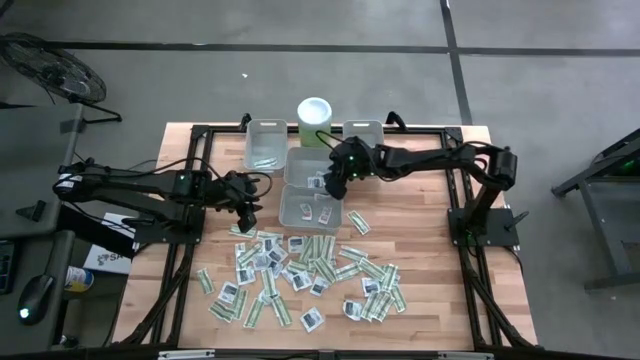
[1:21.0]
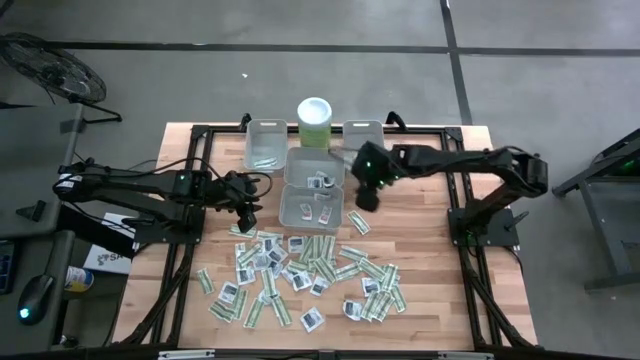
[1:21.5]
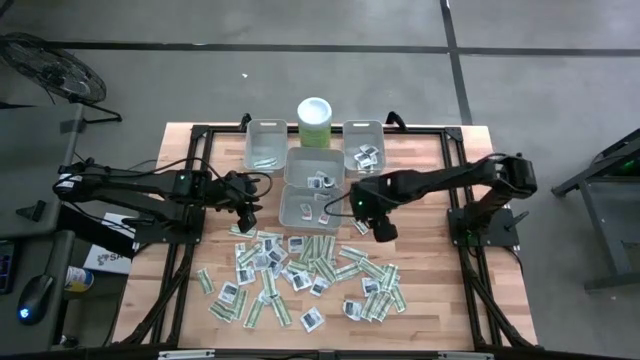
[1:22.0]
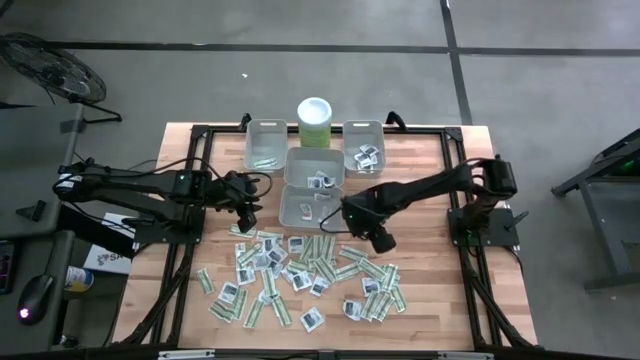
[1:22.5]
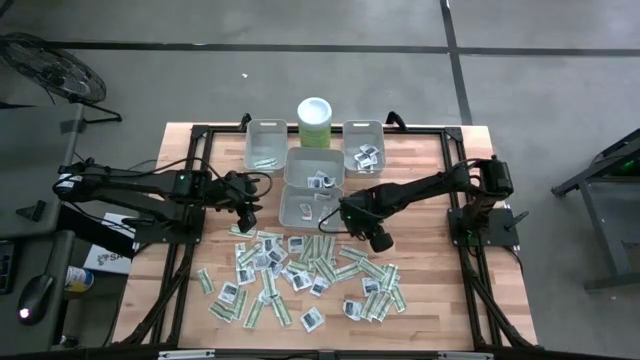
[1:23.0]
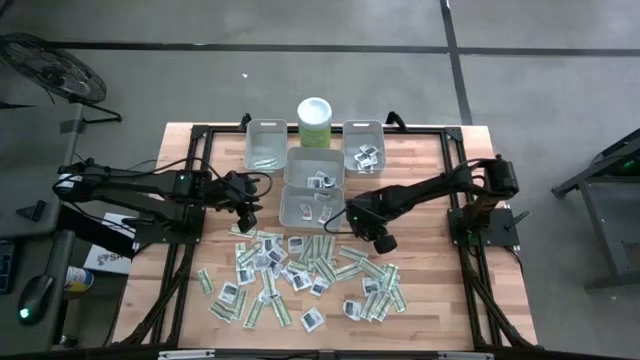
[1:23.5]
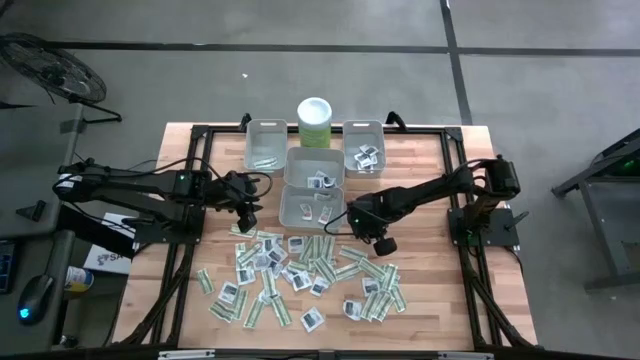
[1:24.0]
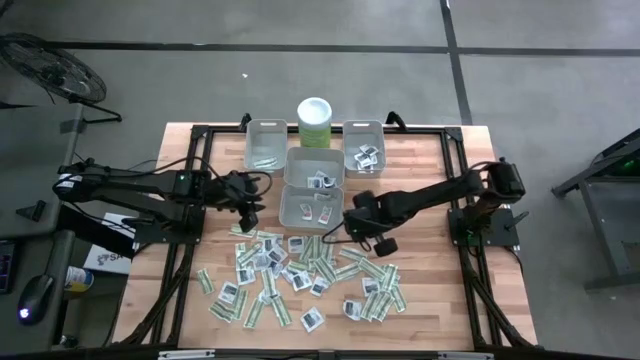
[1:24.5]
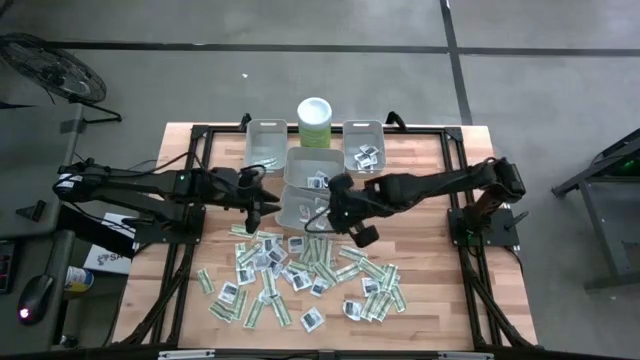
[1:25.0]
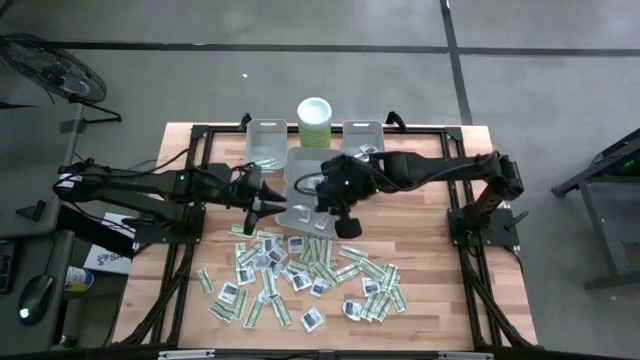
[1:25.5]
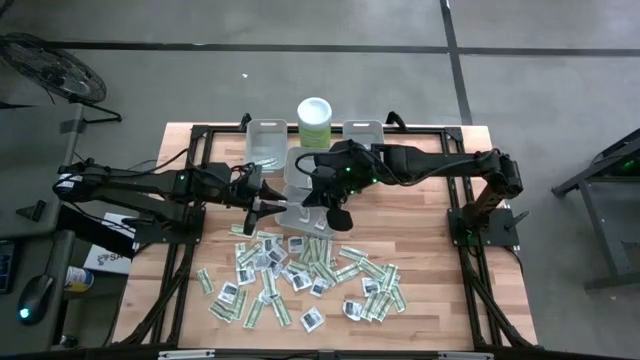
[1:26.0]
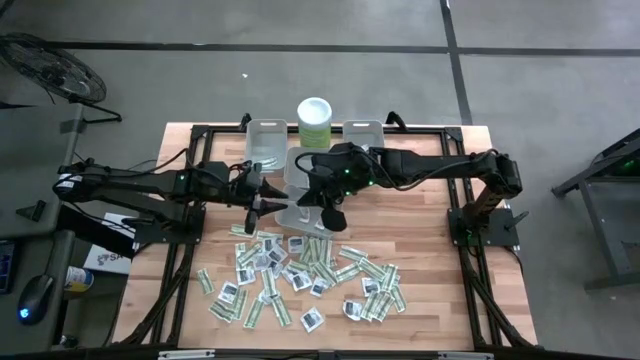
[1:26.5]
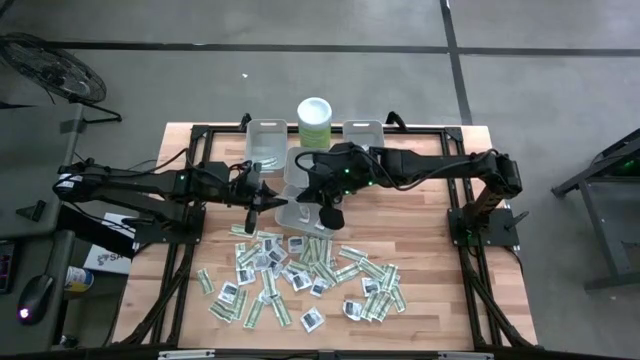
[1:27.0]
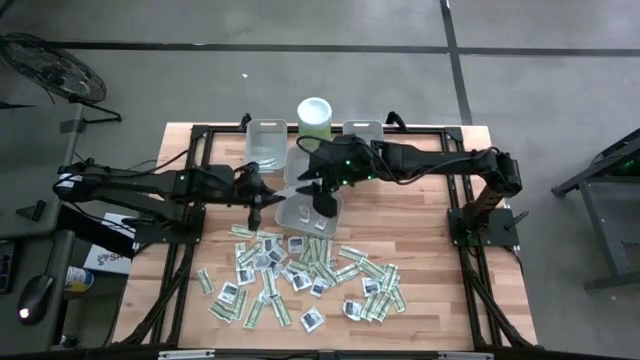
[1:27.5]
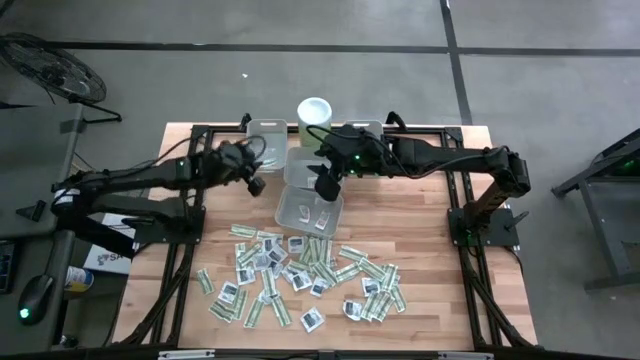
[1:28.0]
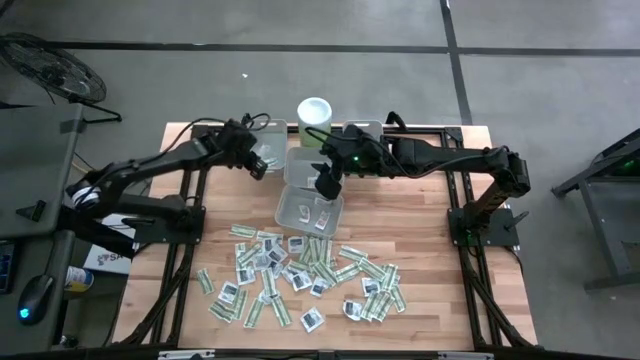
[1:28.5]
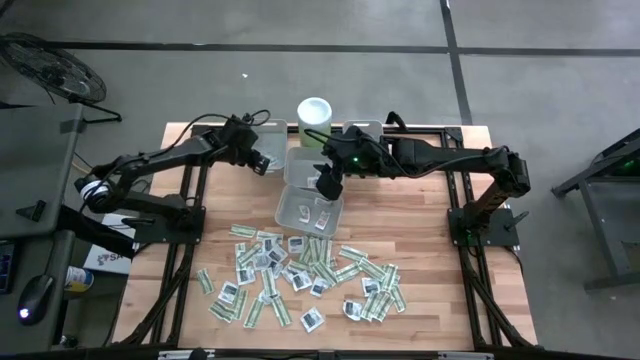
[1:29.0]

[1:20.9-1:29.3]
Task: Pick & Place First Aid Supplies
Put the bandage pack into the left bin

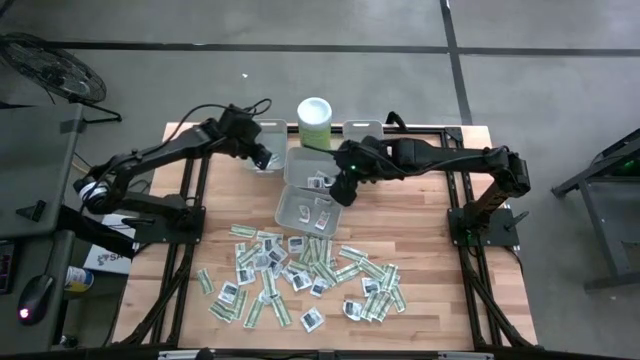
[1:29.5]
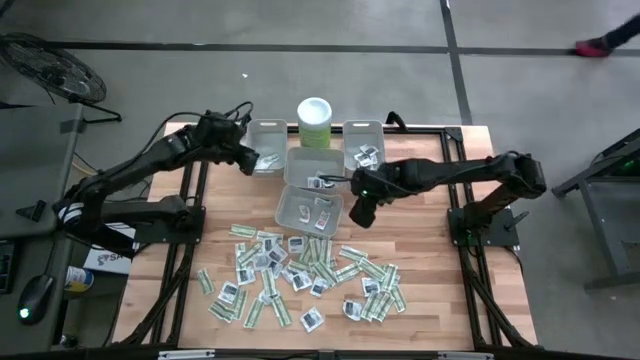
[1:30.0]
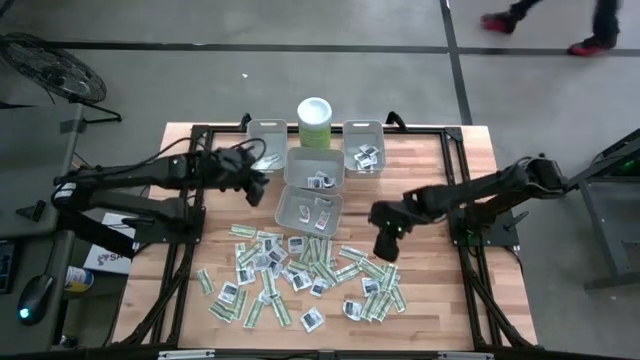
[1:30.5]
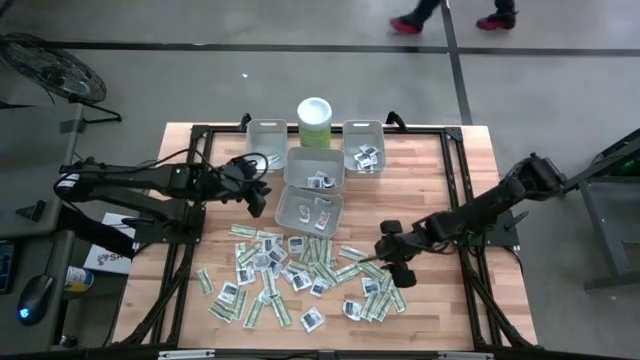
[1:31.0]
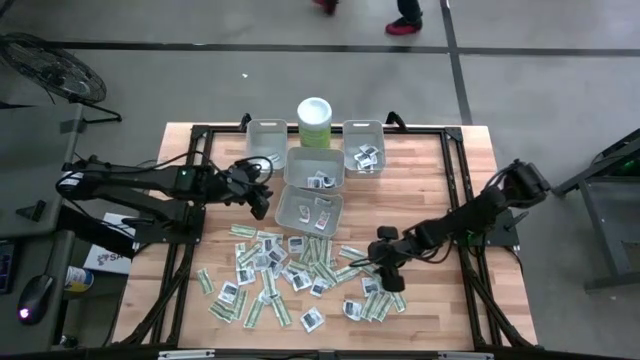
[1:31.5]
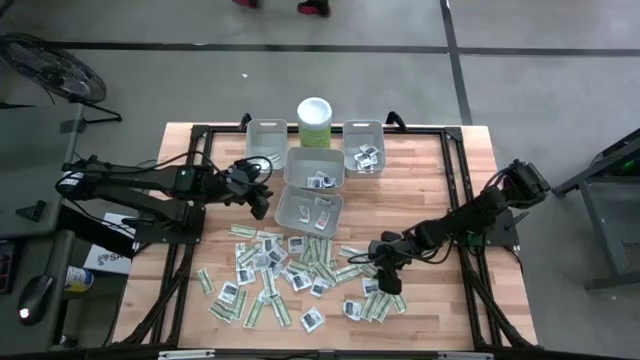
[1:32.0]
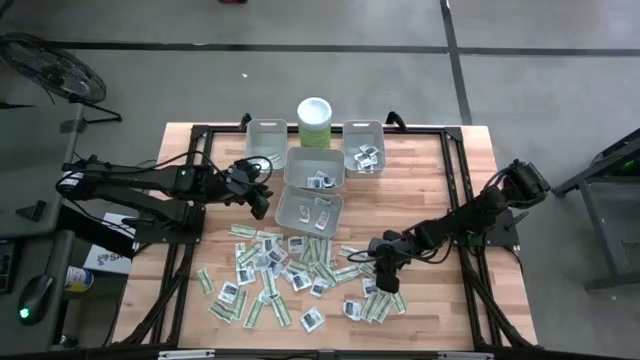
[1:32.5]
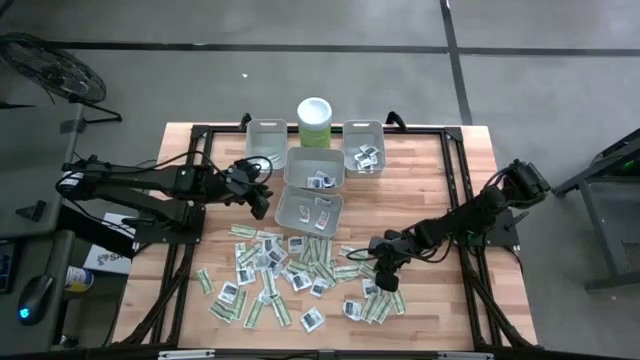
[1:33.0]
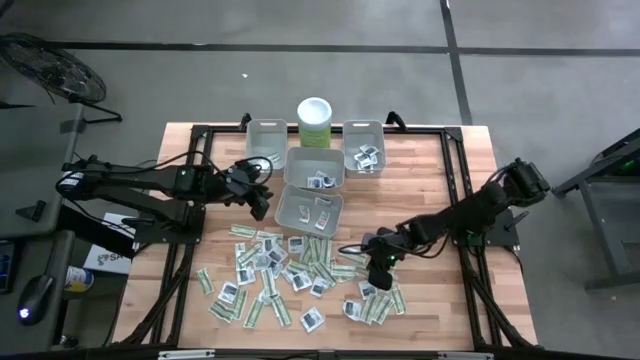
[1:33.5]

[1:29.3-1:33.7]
Put the bandage pack into the left bin

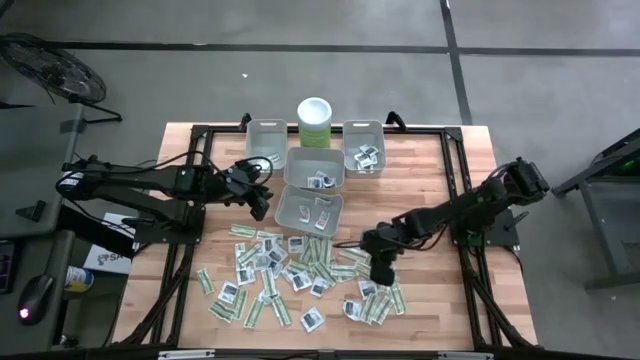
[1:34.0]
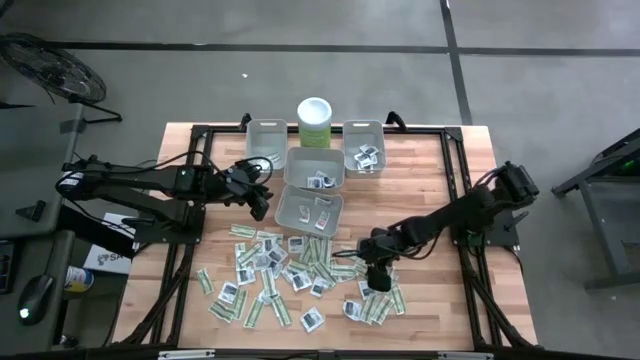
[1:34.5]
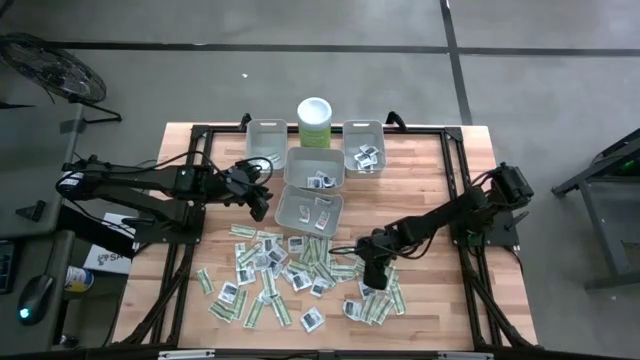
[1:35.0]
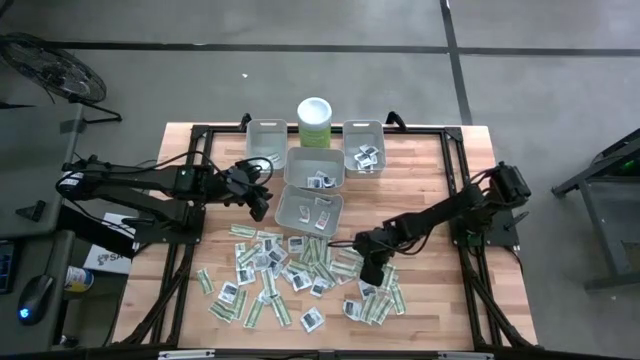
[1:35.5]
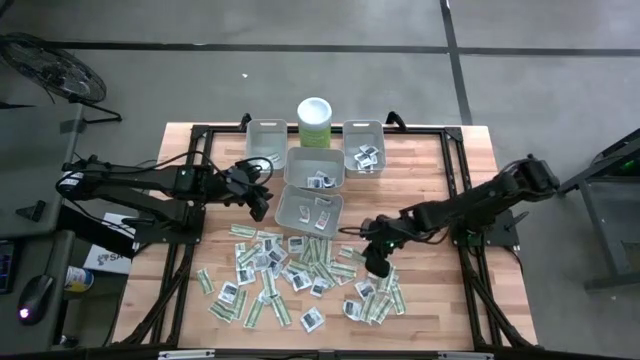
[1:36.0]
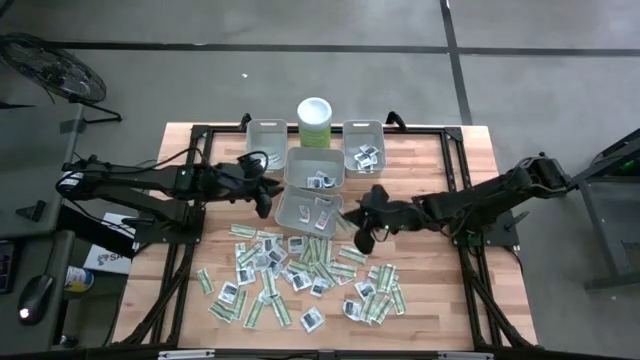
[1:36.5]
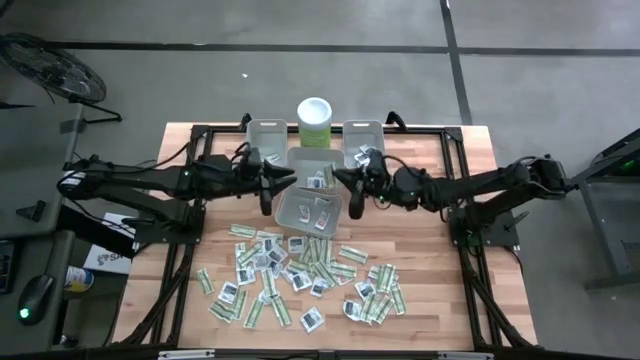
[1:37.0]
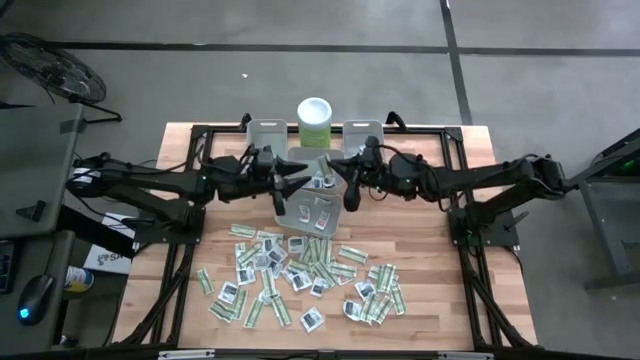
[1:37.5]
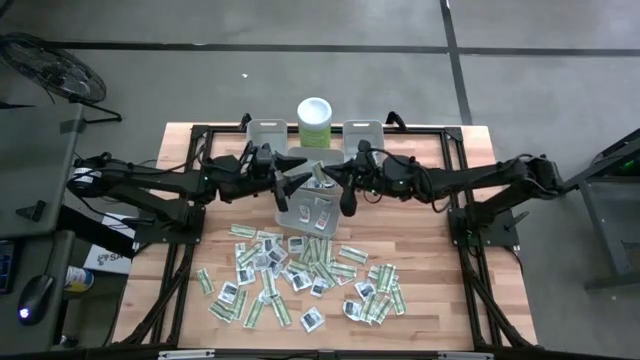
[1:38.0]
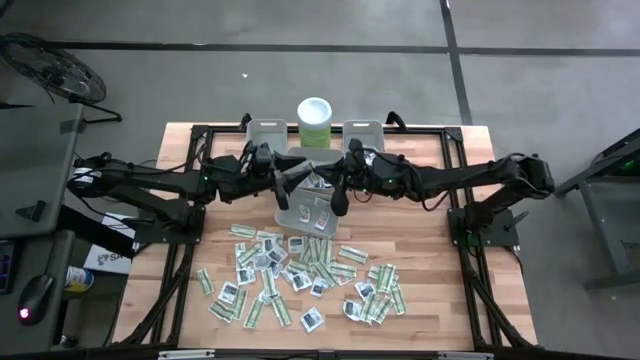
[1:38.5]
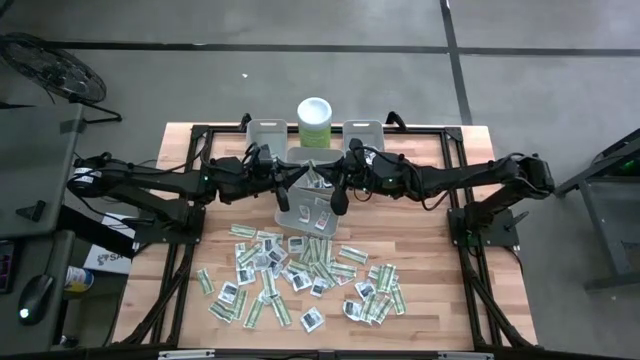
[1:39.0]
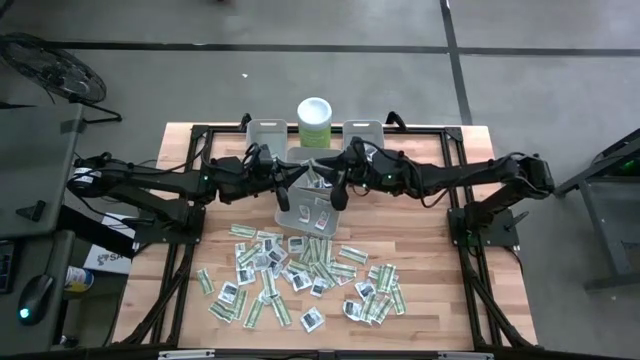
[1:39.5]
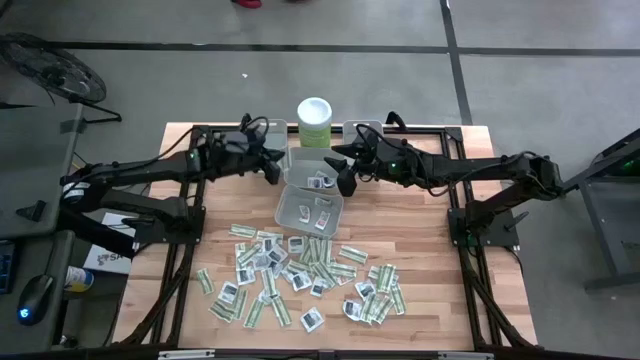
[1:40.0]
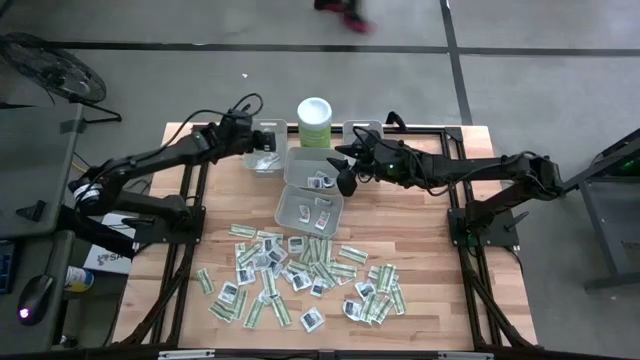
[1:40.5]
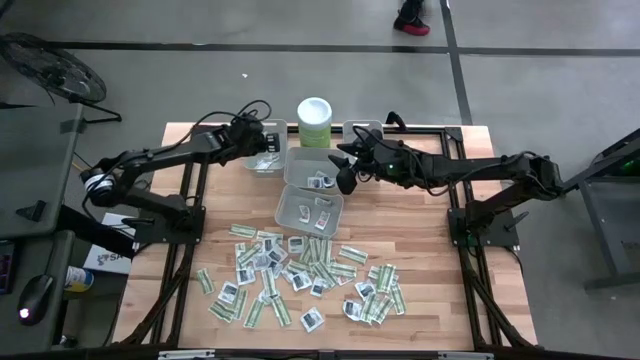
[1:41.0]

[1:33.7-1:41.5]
Put the bandage pack into the left bin

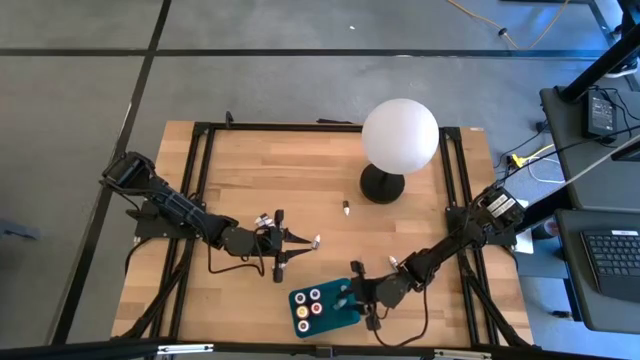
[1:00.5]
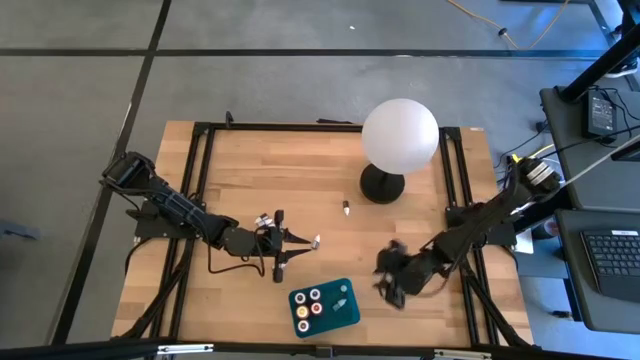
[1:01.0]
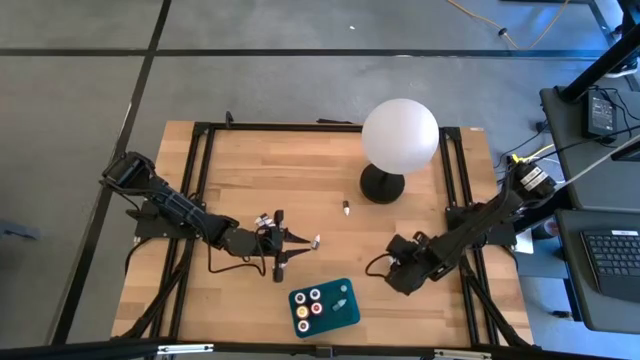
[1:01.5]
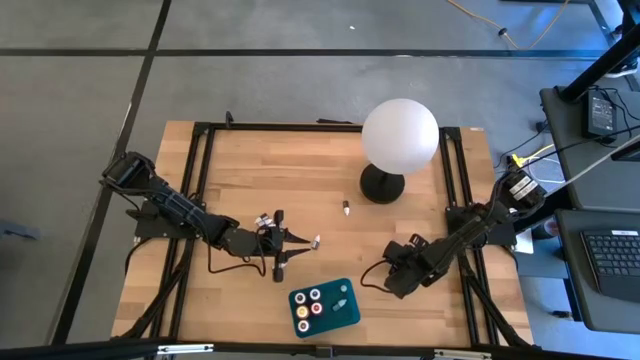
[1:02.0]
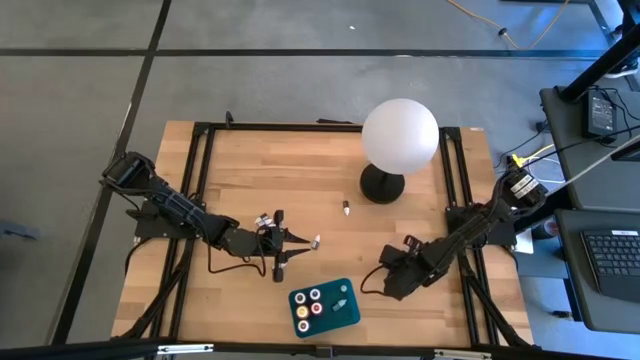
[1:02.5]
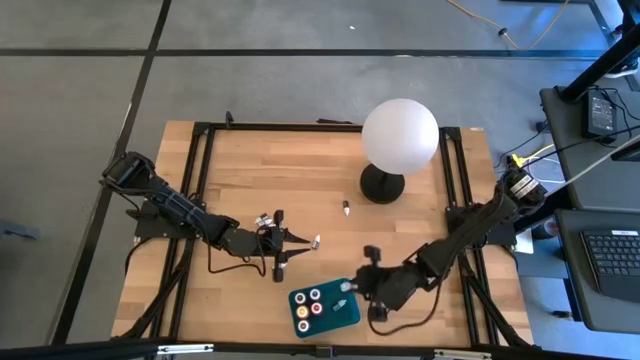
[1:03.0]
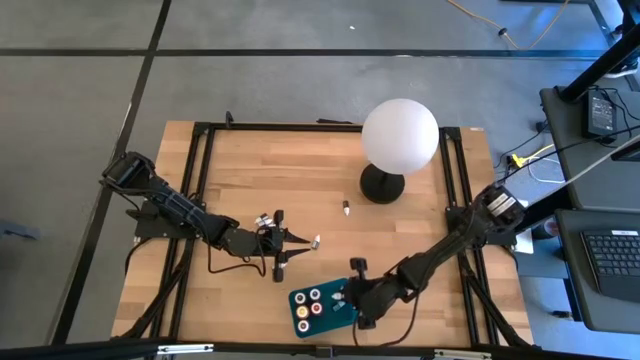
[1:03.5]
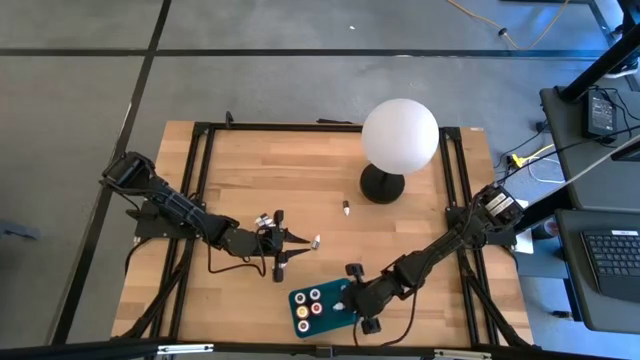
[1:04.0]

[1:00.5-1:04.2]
Task: Pick & Place food coloring
Put the small orange food coloring bottle into the blue bin
